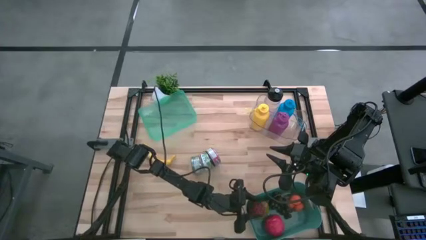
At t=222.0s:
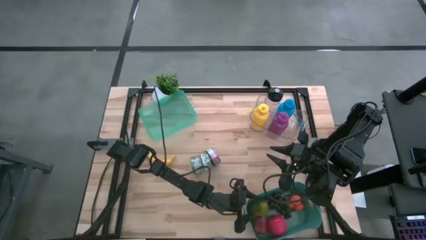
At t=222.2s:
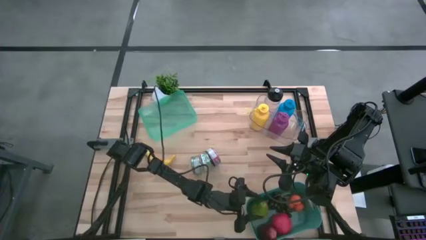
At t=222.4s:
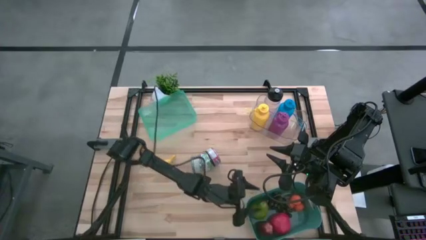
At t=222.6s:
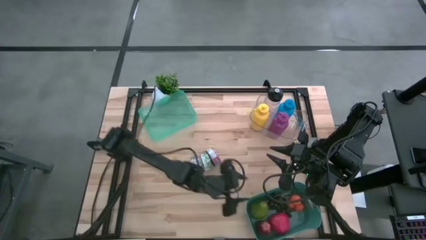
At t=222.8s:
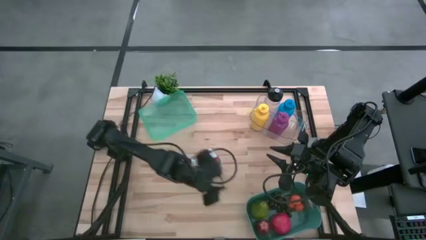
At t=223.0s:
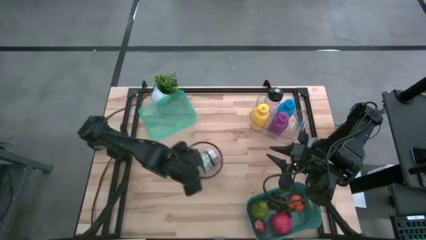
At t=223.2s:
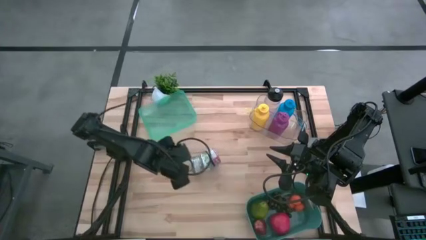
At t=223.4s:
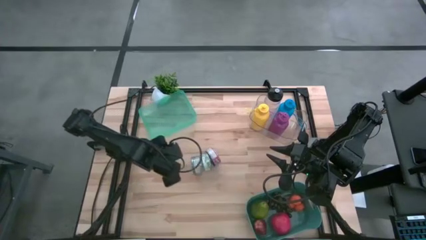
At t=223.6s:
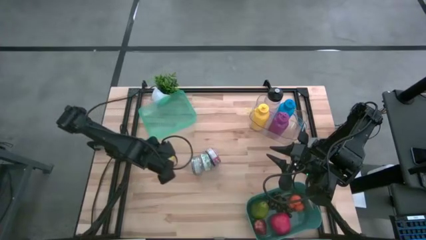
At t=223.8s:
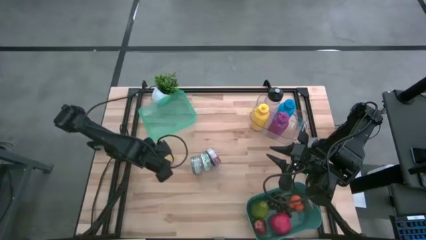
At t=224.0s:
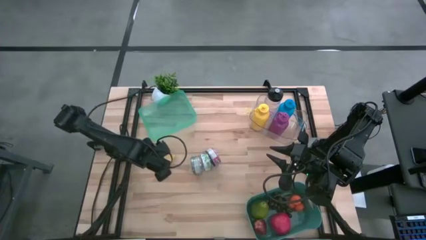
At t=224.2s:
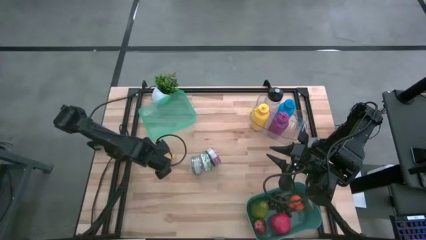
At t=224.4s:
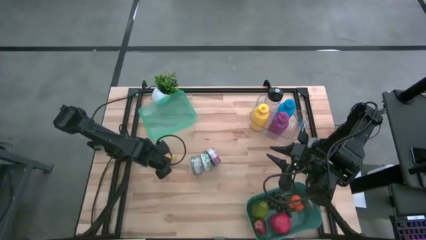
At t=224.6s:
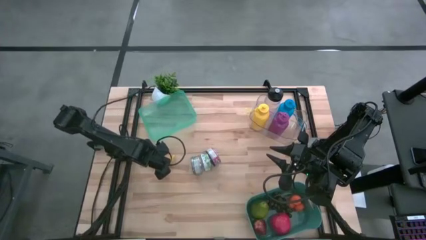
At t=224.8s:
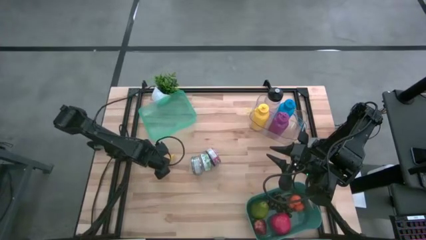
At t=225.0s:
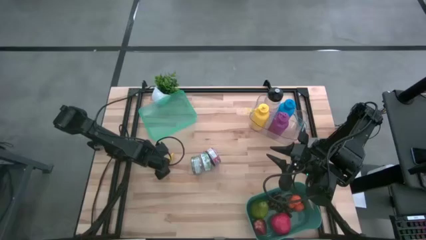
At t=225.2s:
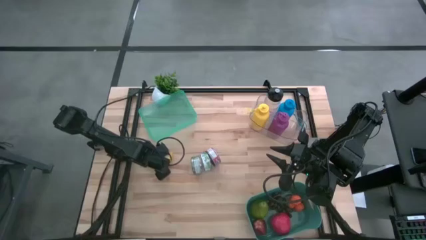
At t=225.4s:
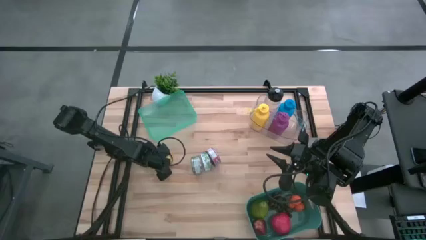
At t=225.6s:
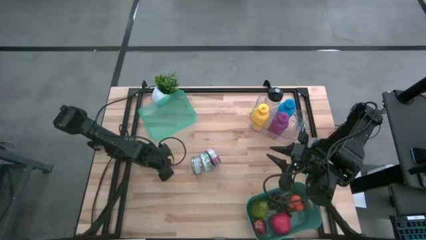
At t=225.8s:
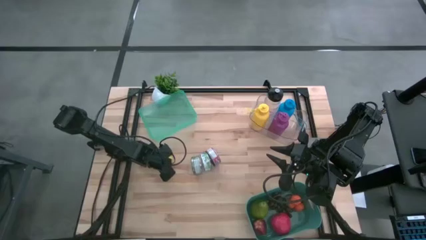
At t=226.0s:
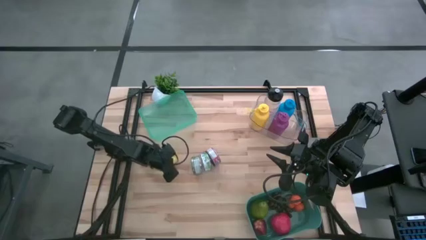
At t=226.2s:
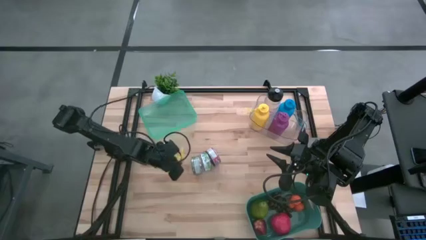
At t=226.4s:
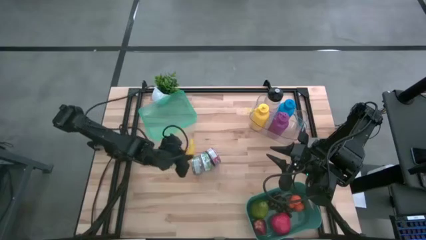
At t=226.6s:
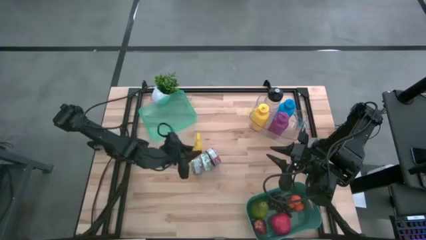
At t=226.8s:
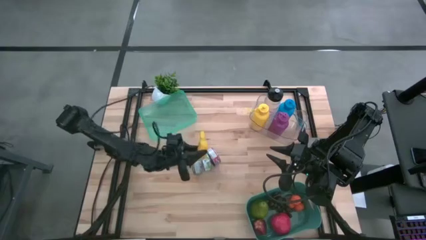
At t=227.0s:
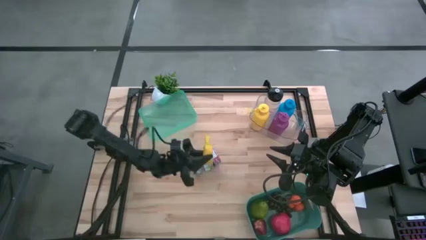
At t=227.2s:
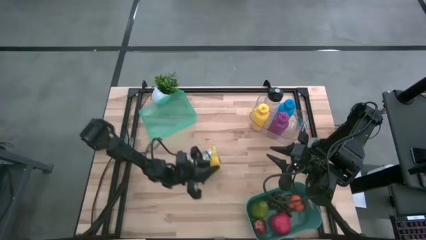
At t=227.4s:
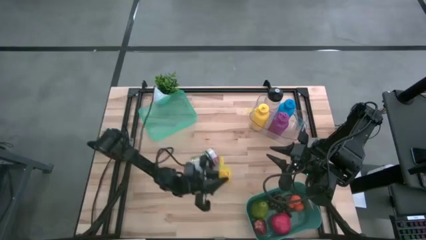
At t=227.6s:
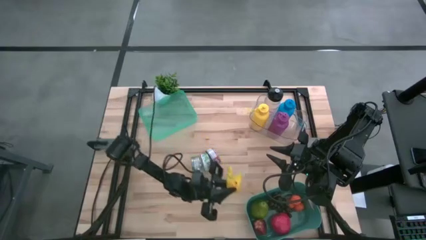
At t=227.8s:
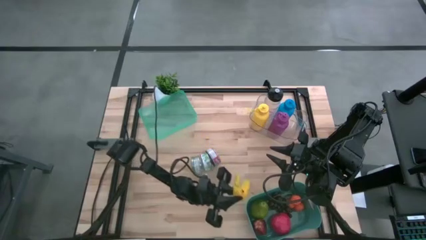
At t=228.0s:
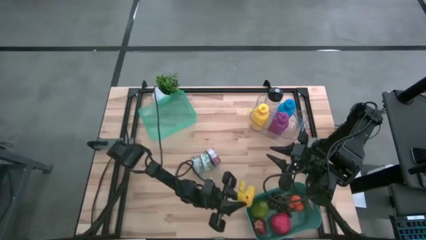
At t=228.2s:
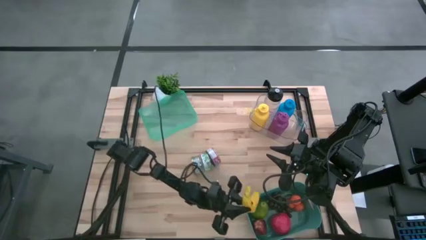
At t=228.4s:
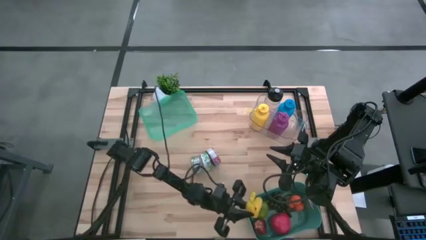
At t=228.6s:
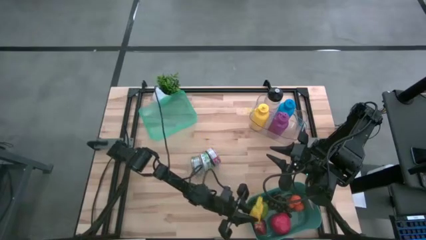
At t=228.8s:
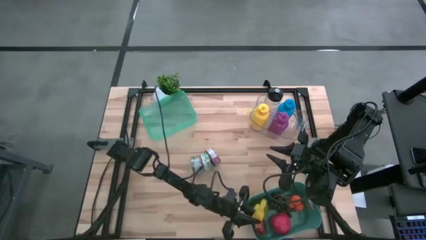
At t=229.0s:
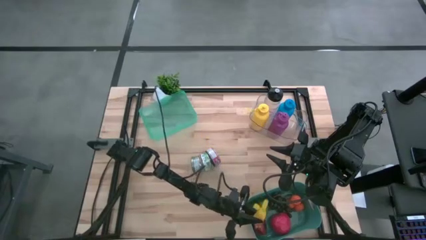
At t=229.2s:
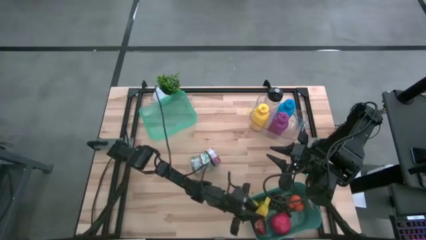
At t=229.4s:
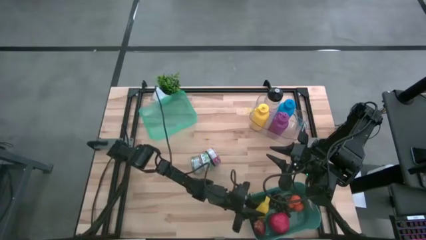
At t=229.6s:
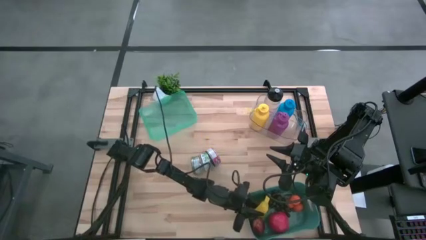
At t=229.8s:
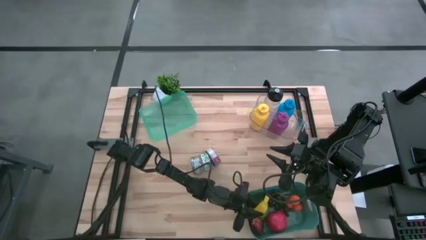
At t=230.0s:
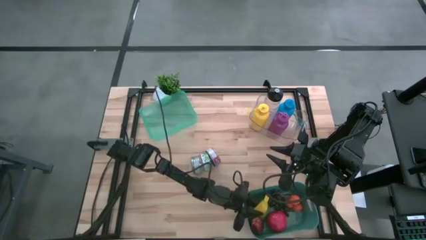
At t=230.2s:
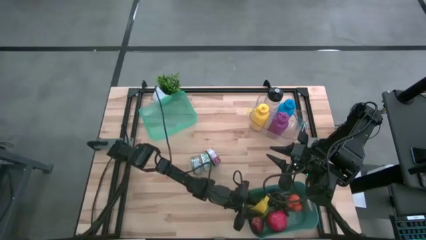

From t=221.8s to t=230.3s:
Task: Pick & Place Food Item
Put the yellow banana into the dark green bin

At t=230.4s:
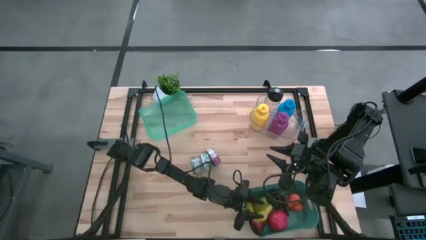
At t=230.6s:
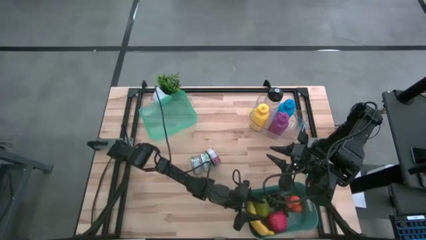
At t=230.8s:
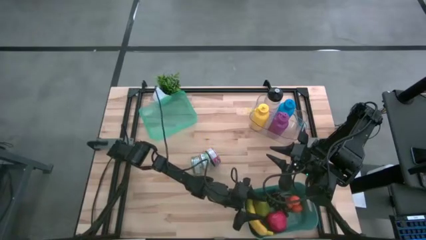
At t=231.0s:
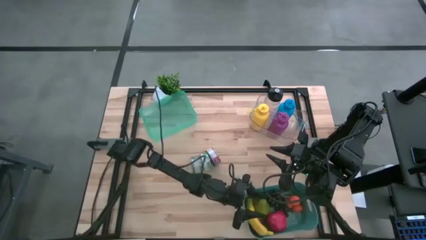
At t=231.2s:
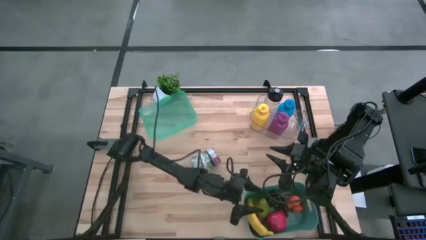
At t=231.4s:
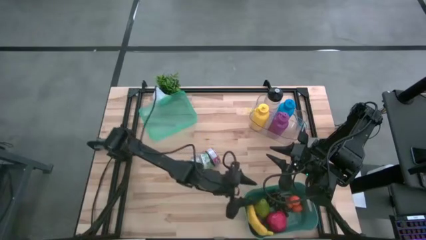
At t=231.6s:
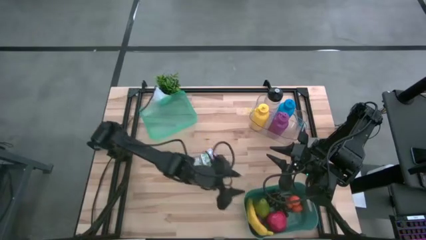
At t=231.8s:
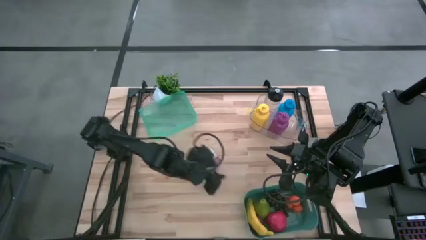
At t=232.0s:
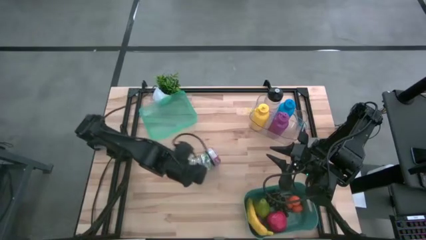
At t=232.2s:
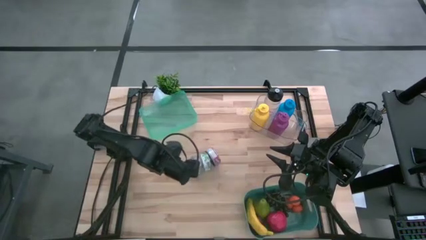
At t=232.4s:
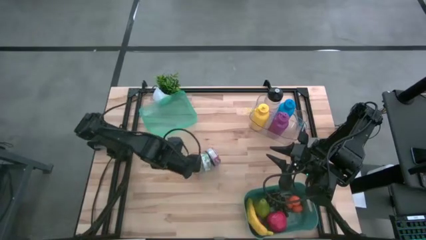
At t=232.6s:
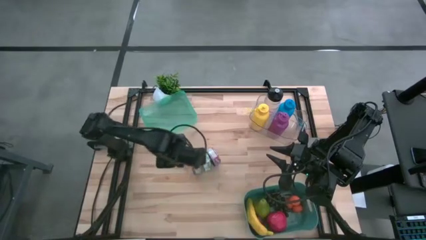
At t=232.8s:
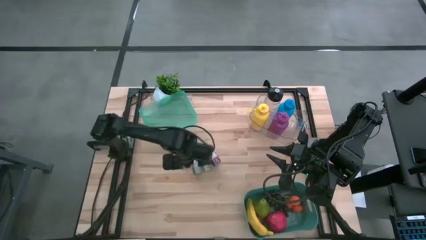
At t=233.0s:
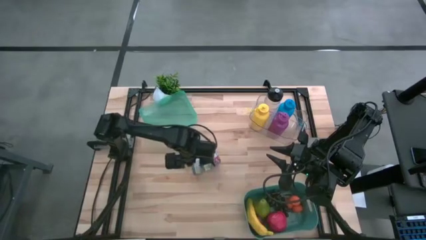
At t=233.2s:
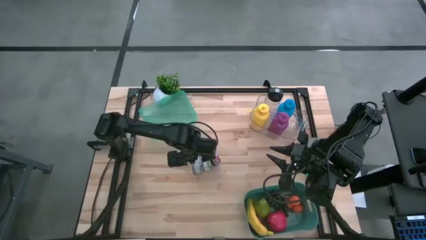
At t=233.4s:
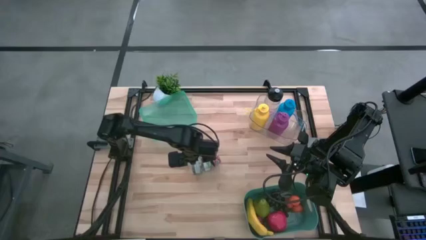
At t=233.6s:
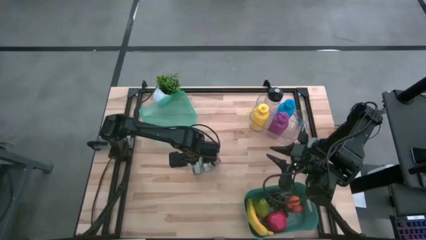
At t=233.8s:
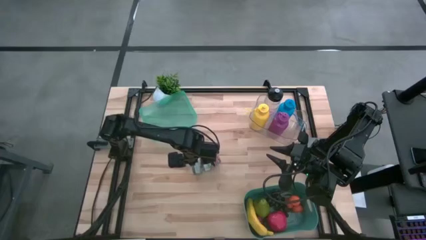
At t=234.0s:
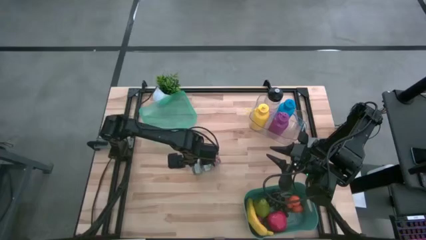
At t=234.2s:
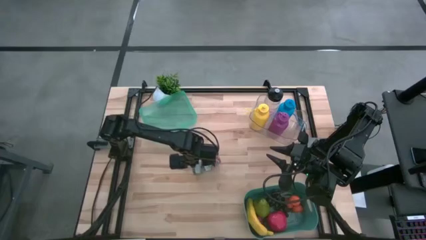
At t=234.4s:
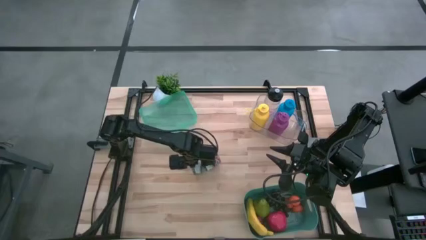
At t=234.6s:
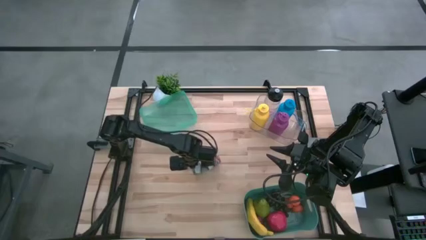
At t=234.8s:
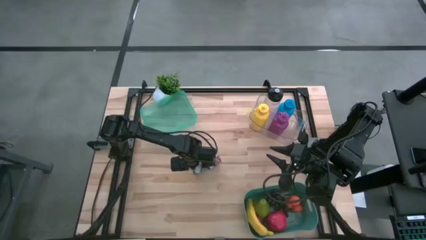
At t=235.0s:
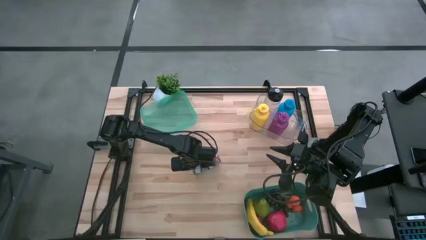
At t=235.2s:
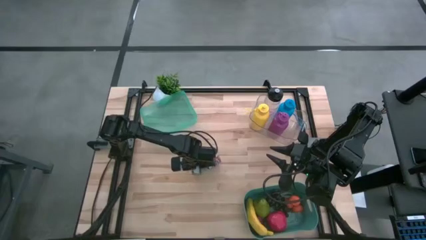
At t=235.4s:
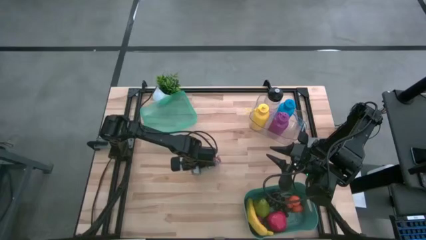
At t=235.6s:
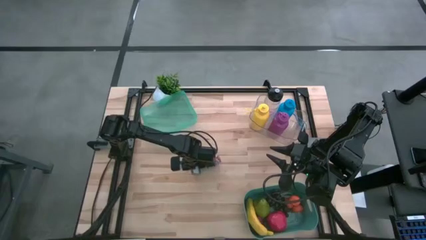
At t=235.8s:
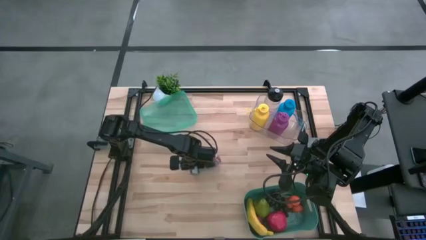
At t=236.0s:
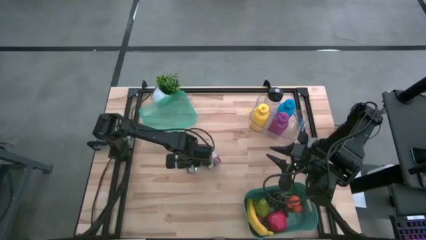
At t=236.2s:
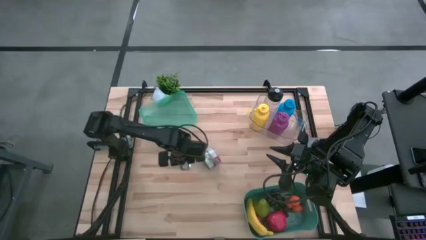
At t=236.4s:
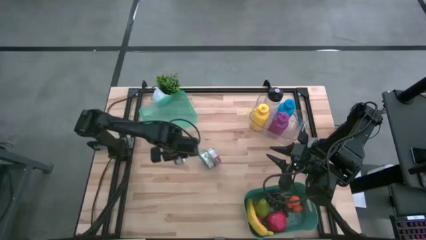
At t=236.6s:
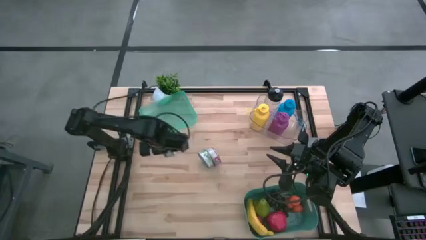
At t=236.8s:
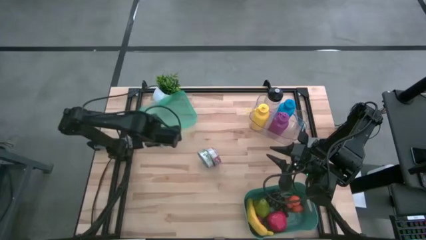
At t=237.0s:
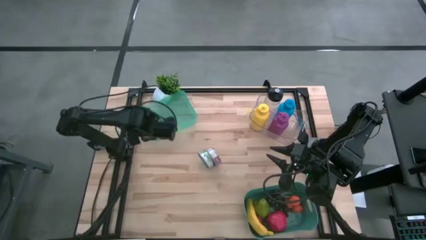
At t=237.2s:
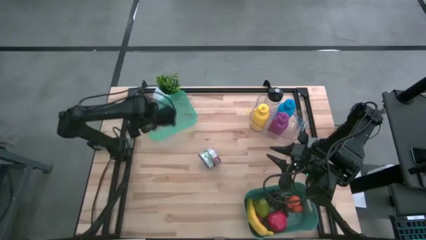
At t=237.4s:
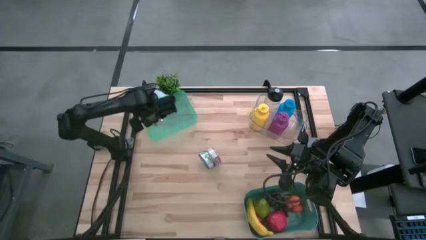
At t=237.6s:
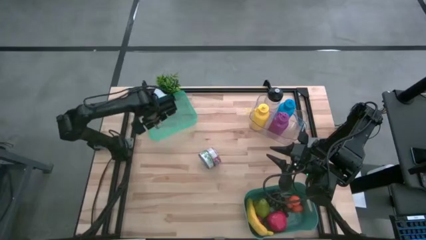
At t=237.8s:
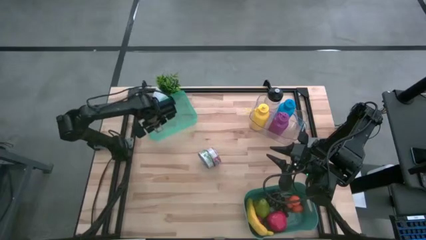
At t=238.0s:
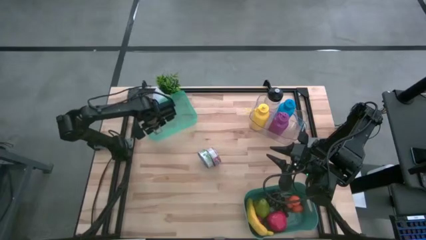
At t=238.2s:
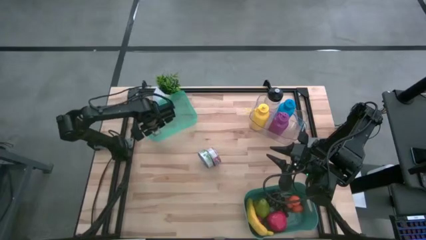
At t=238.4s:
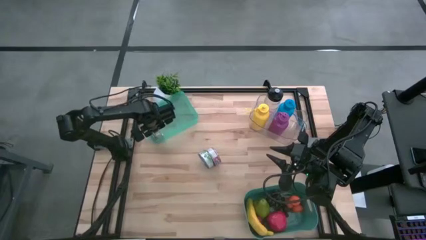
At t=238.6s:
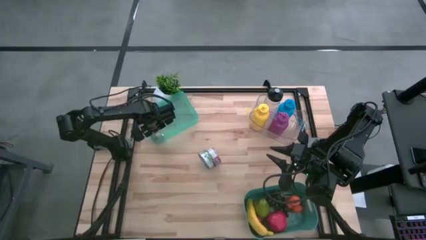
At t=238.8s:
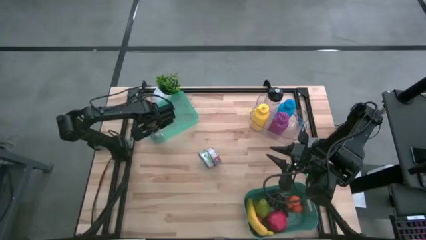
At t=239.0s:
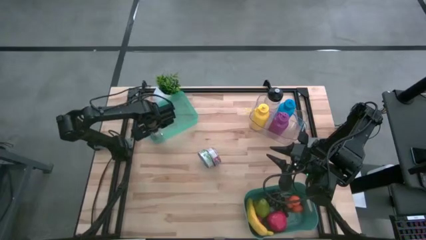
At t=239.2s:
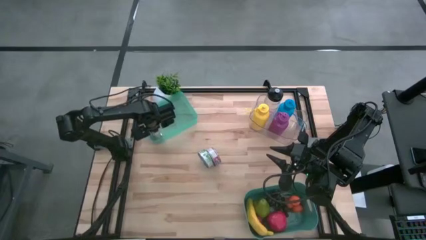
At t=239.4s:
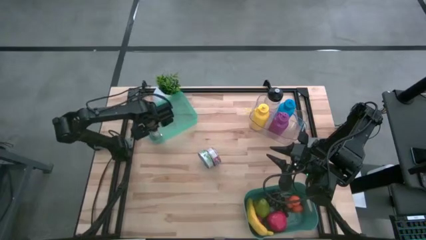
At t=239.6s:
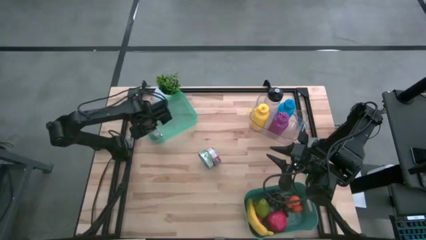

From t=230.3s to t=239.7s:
Put the left green tuna can into the blue transparent bin
